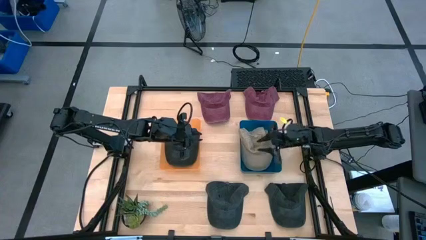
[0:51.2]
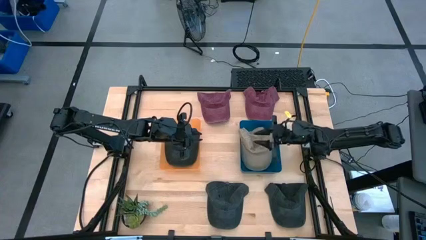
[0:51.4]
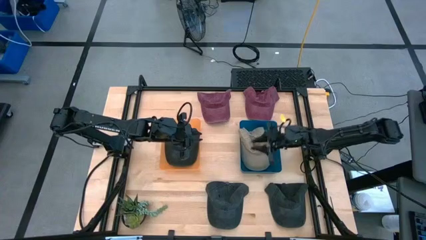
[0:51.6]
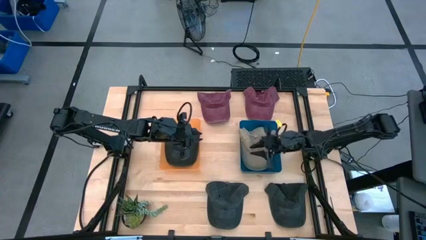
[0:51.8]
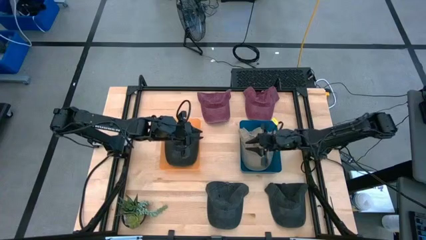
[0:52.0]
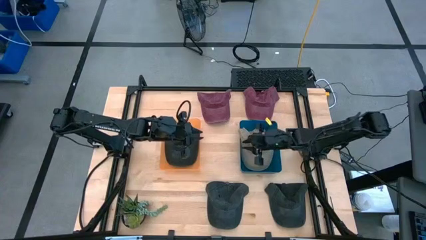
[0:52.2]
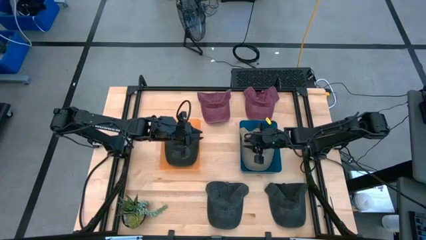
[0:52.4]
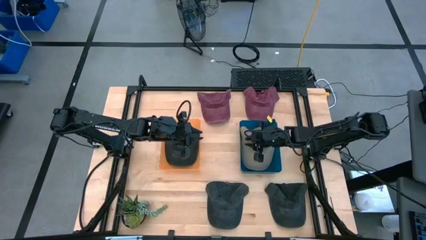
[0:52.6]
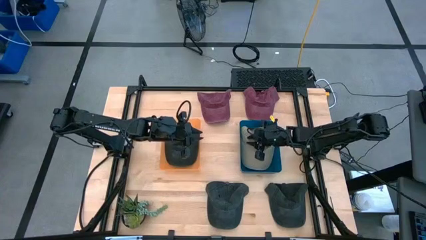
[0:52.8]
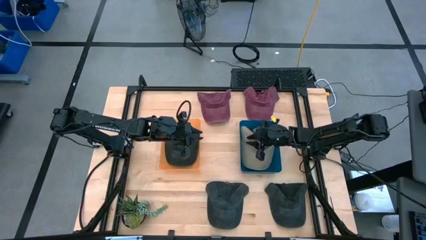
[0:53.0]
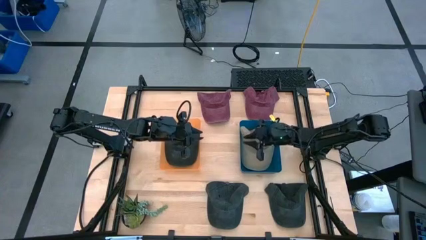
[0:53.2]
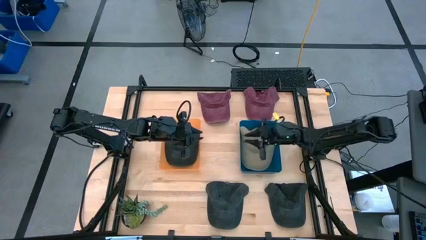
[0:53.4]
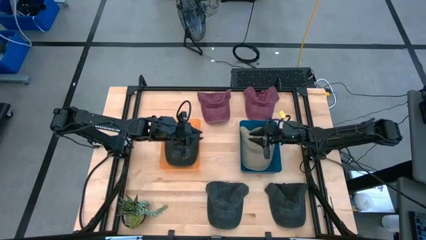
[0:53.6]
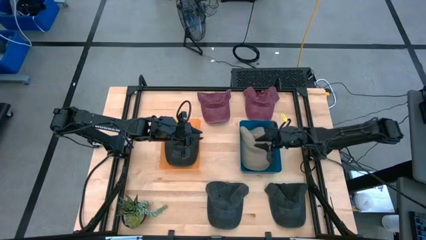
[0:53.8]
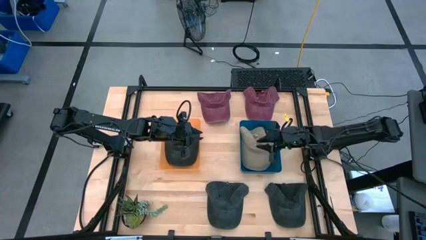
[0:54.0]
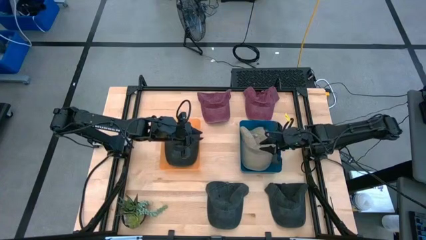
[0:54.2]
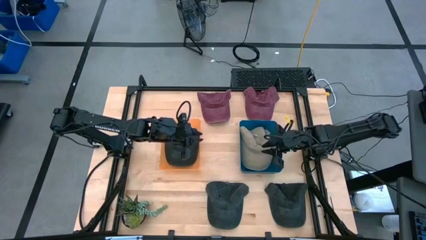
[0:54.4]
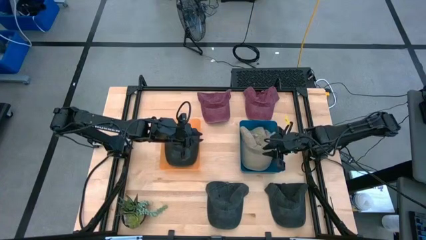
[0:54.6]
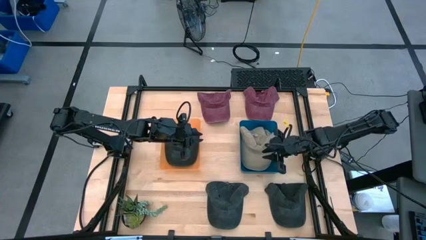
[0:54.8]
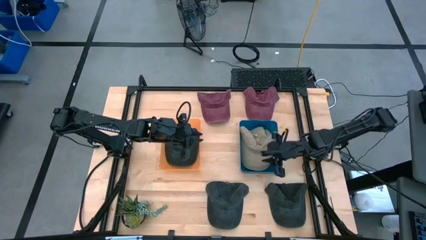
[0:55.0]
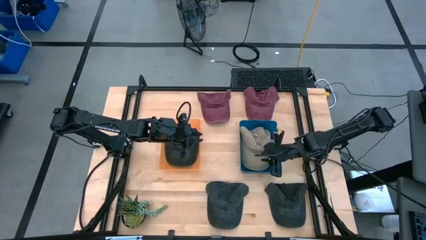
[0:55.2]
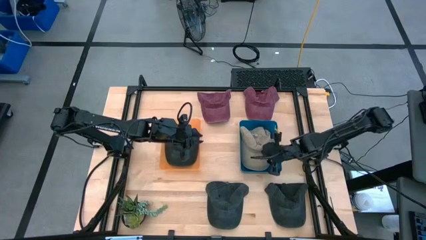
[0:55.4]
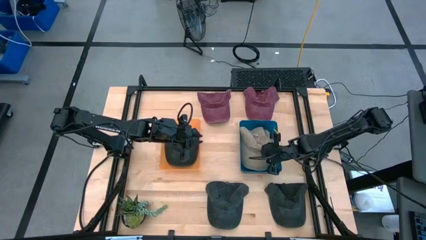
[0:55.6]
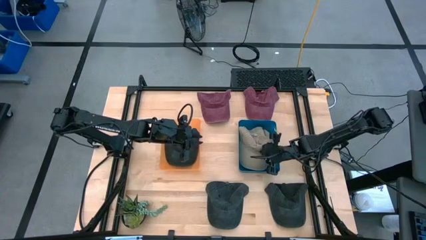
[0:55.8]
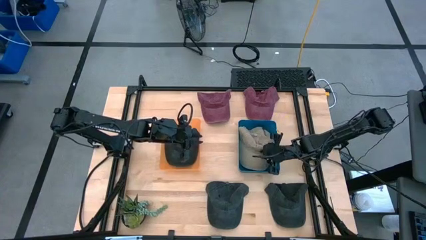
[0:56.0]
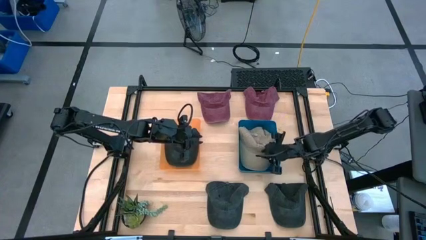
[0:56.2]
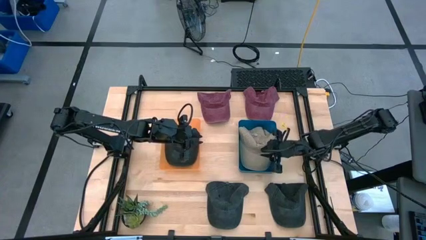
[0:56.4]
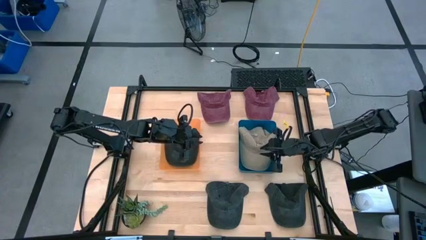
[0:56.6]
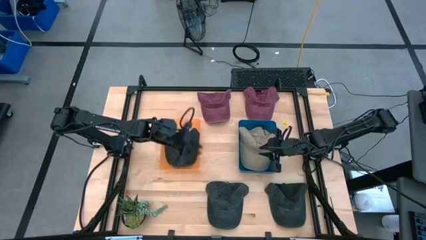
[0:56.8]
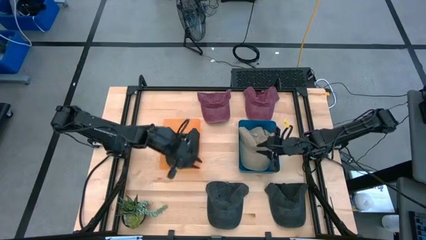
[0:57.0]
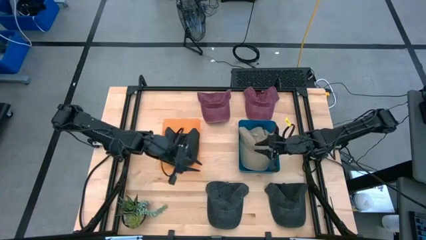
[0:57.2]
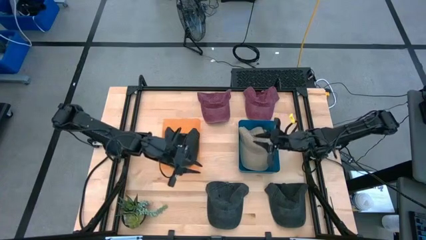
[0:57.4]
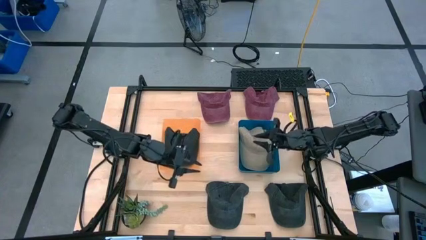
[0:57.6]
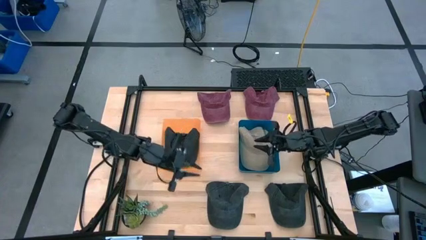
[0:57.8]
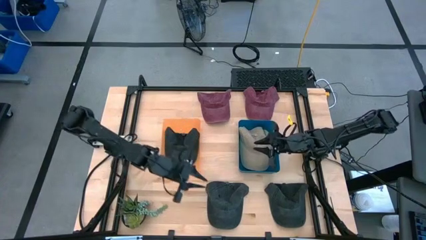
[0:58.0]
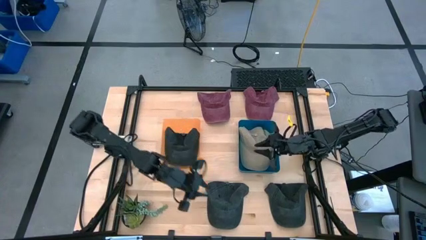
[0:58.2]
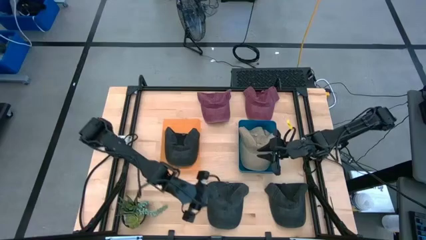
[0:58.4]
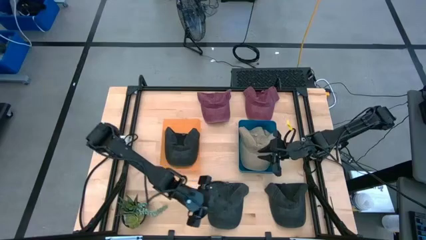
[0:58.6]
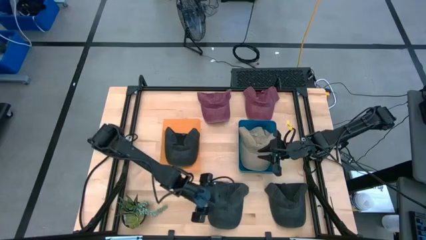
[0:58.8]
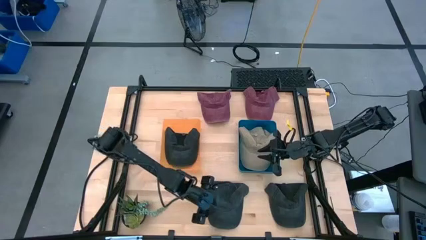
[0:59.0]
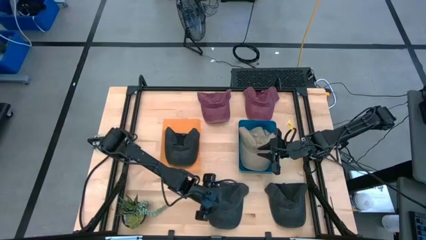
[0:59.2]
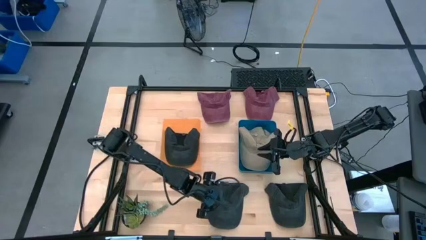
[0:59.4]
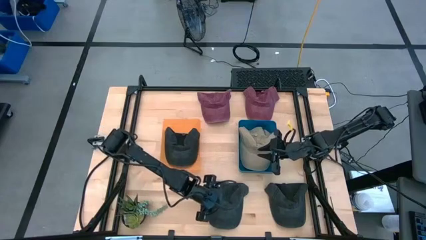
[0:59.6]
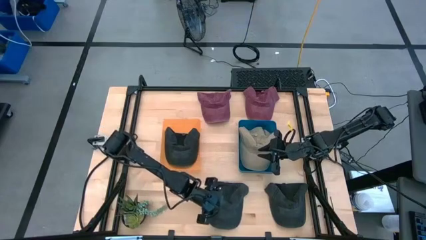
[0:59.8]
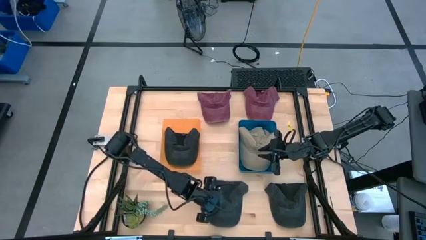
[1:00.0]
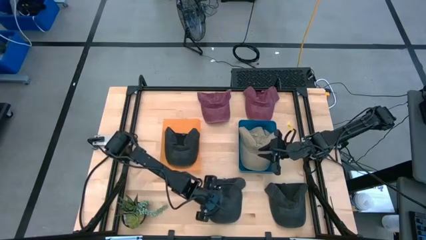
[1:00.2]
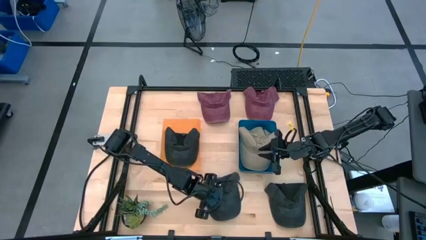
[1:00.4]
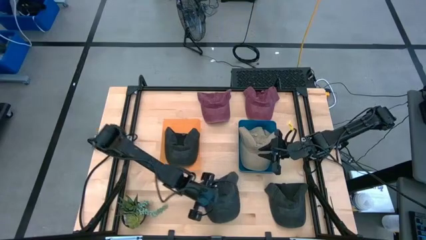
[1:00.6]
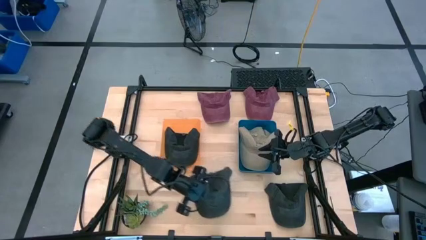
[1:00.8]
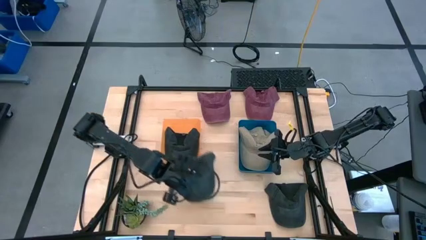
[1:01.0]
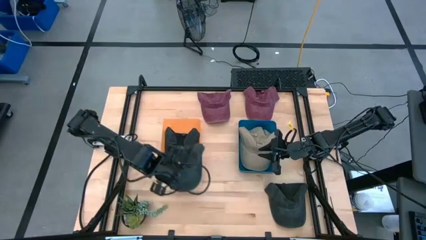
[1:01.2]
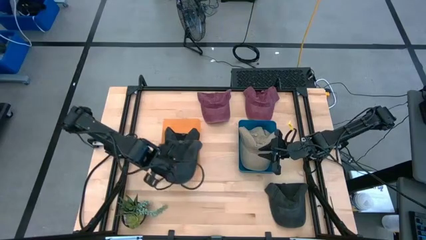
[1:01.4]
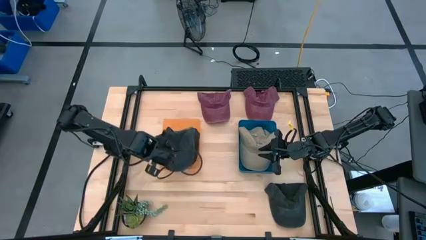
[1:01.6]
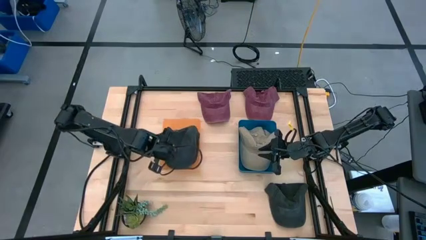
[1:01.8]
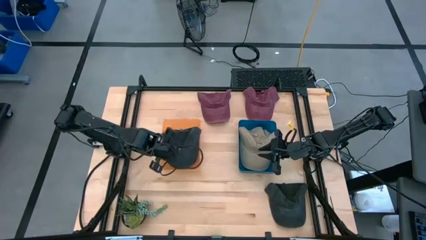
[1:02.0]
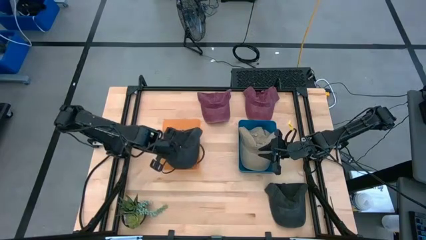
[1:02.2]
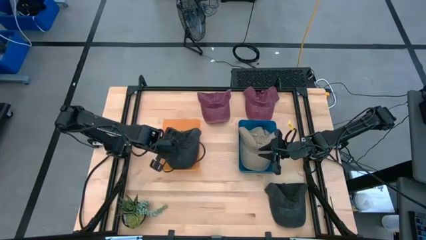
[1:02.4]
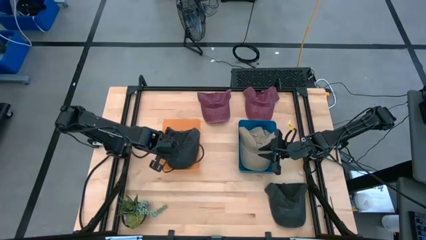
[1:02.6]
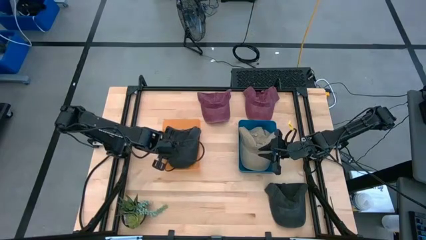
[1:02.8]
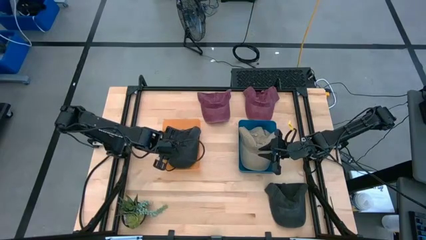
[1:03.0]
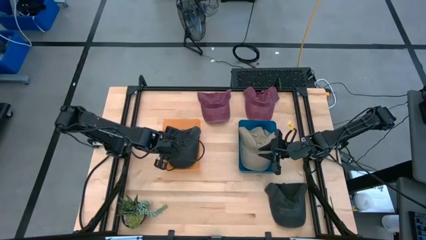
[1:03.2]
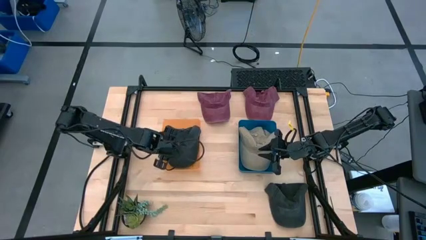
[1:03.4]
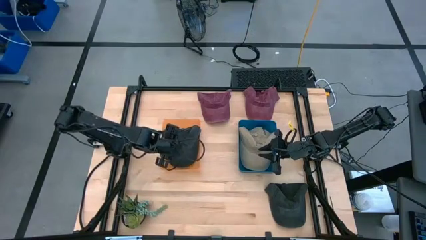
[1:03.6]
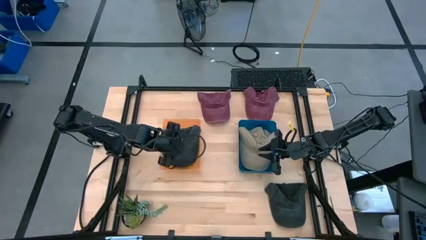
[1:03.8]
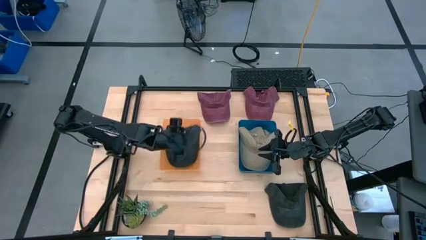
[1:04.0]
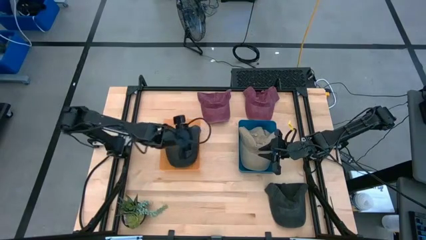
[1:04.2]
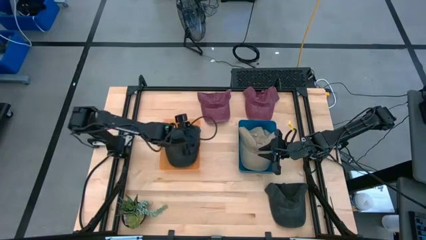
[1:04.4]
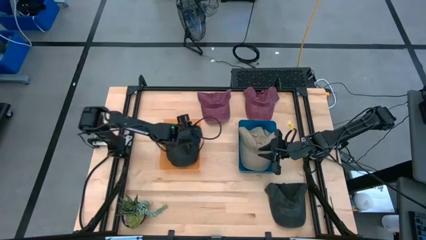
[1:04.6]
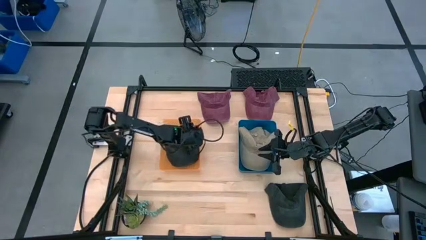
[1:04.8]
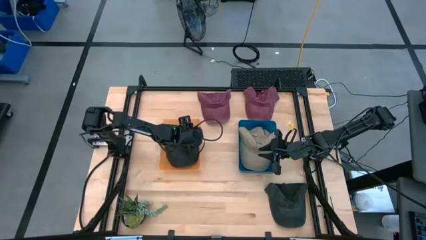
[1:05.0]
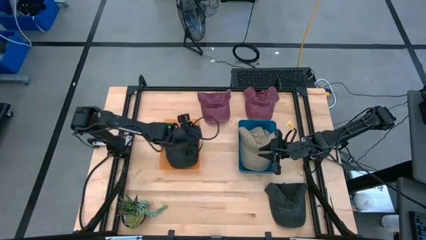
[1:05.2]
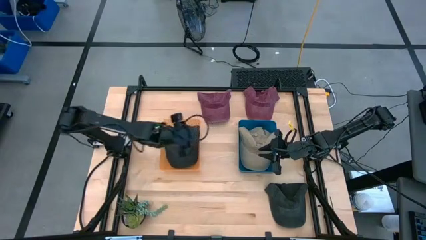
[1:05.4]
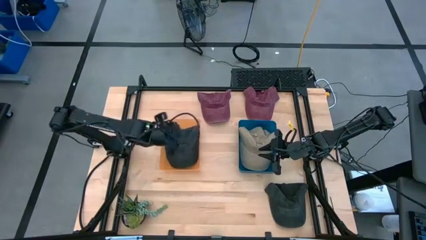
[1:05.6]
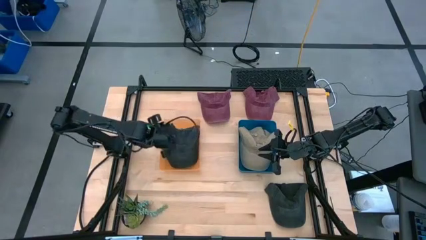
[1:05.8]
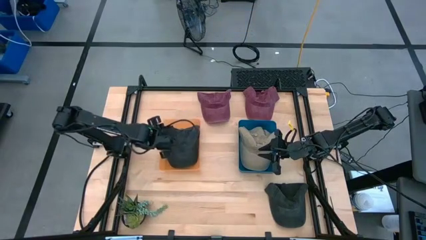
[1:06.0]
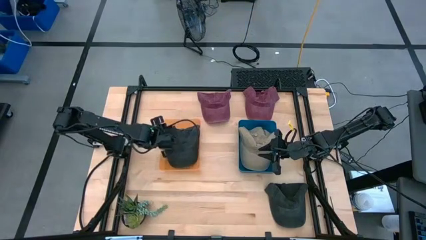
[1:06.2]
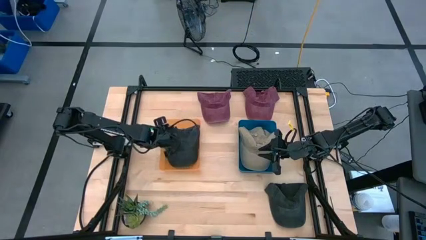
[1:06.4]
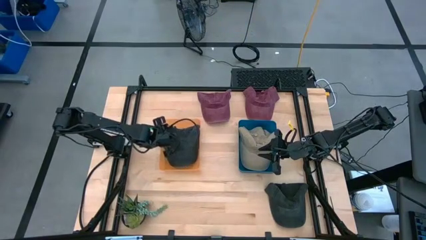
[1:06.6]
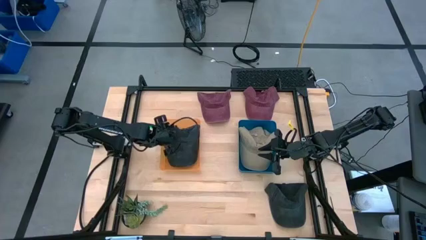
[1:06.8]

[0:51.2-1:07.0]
Task: Pick & Place hat
Put the left black cap into the orange bin
